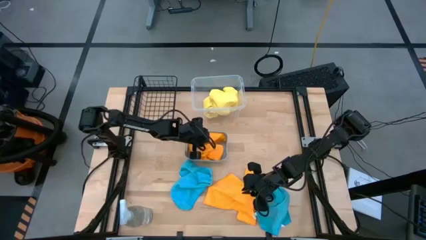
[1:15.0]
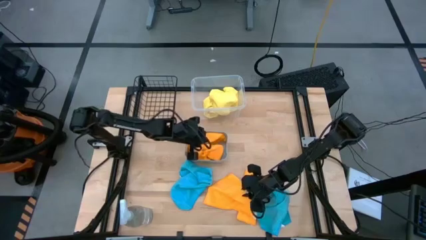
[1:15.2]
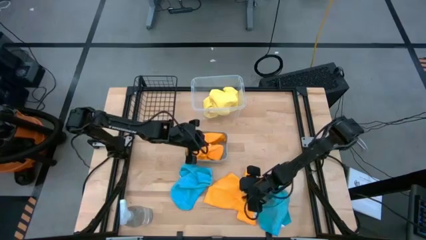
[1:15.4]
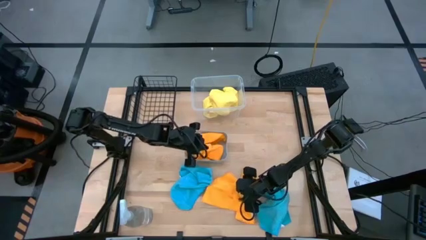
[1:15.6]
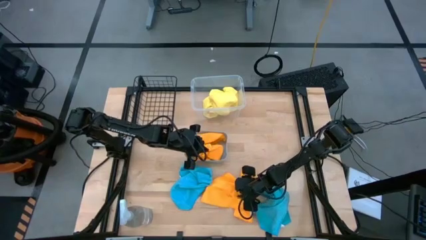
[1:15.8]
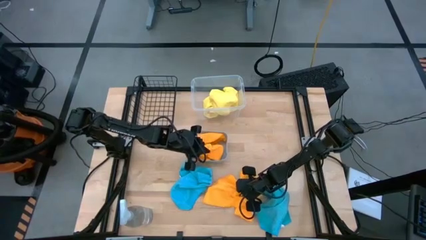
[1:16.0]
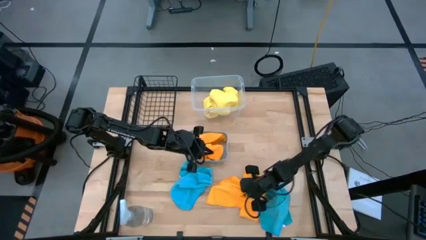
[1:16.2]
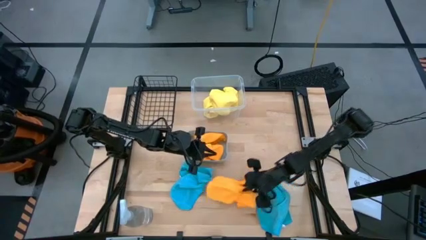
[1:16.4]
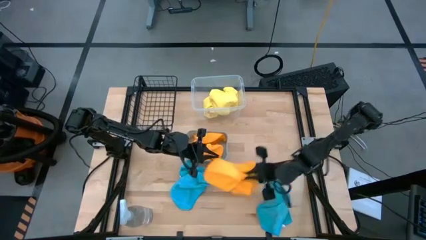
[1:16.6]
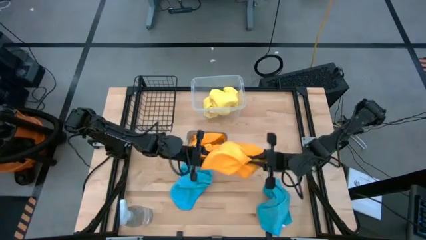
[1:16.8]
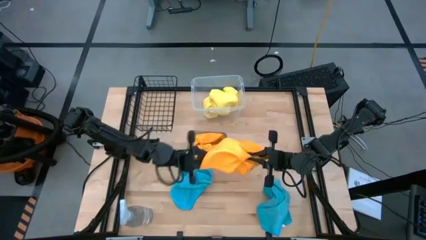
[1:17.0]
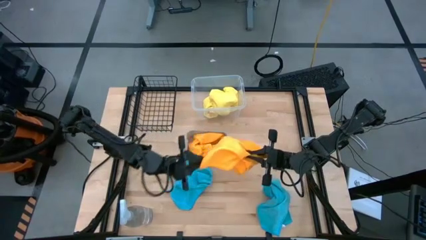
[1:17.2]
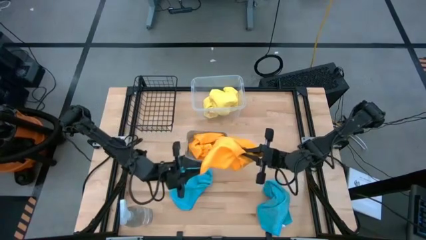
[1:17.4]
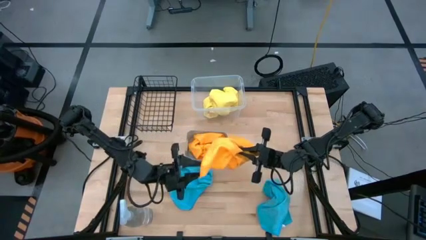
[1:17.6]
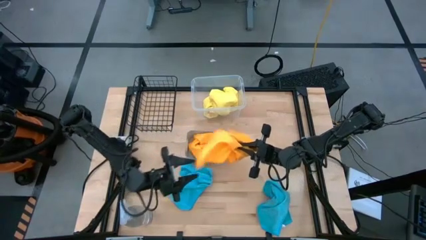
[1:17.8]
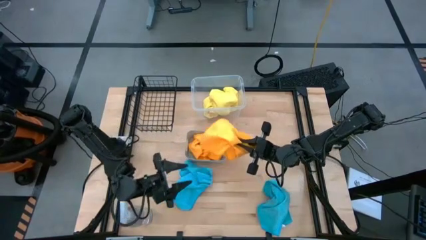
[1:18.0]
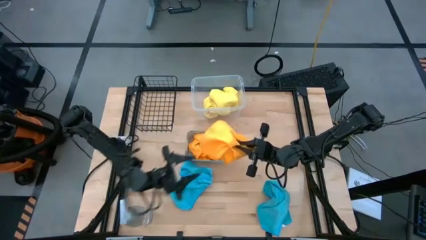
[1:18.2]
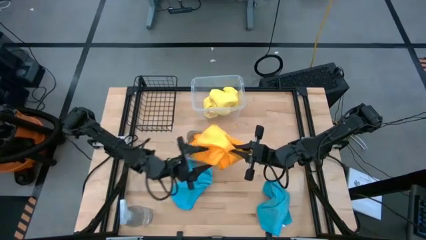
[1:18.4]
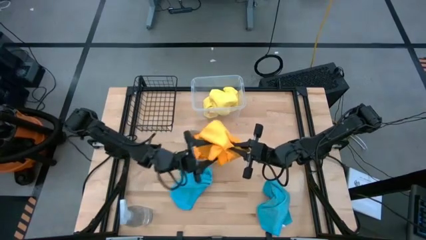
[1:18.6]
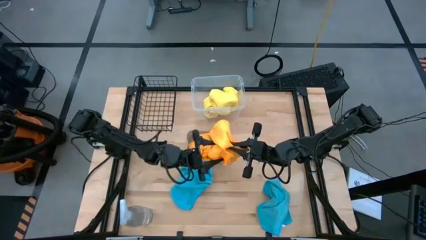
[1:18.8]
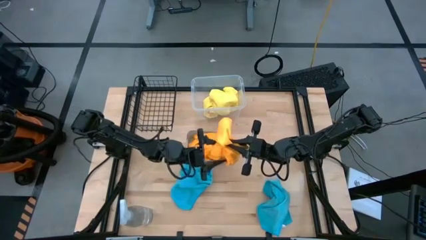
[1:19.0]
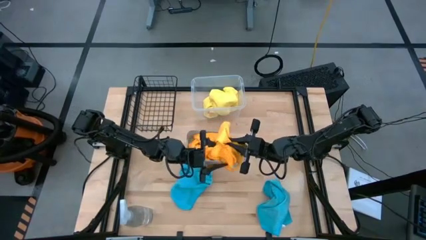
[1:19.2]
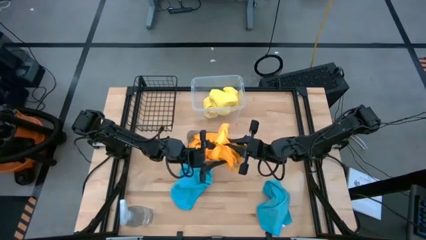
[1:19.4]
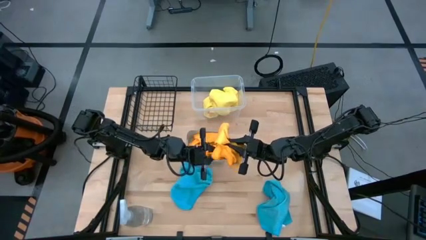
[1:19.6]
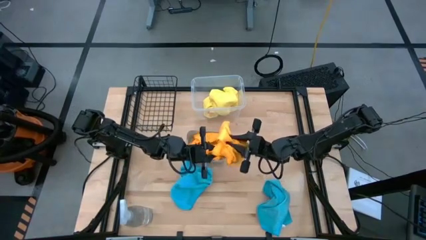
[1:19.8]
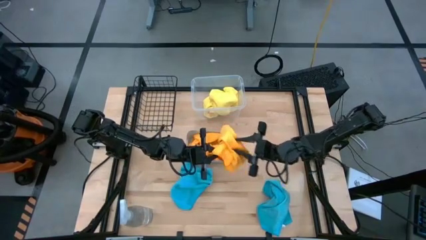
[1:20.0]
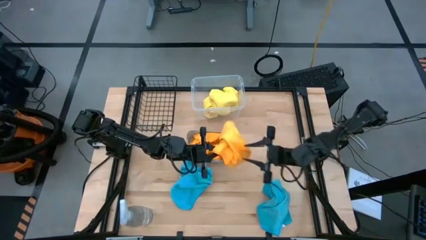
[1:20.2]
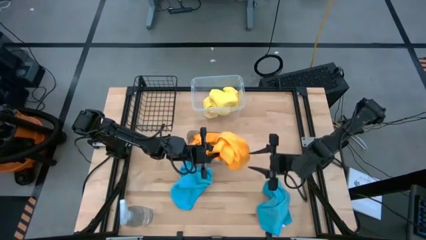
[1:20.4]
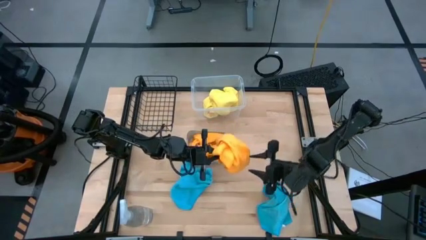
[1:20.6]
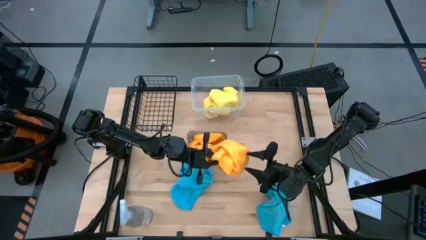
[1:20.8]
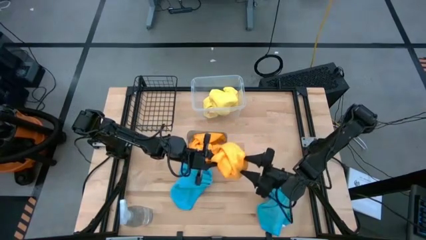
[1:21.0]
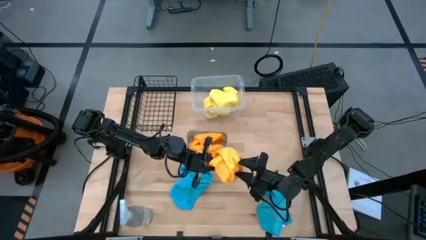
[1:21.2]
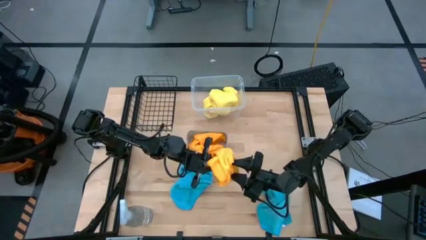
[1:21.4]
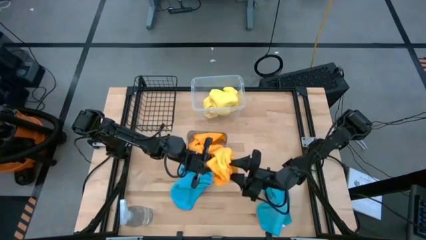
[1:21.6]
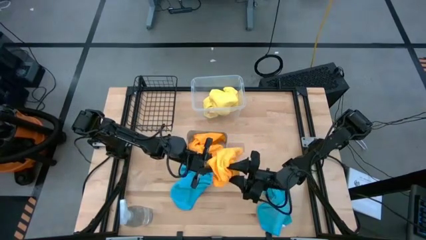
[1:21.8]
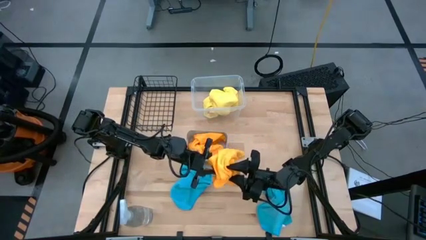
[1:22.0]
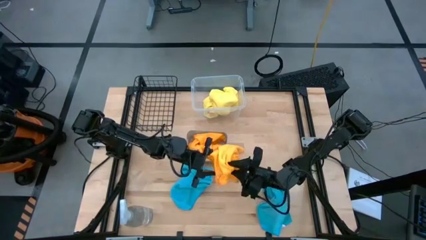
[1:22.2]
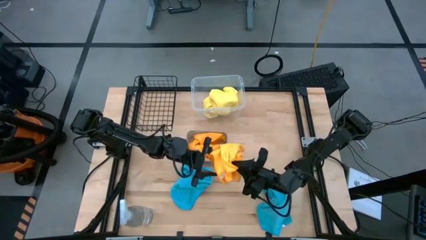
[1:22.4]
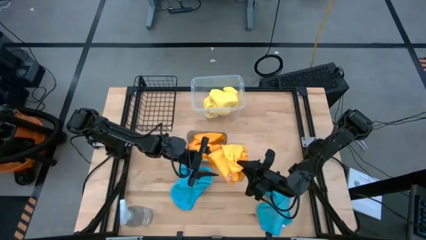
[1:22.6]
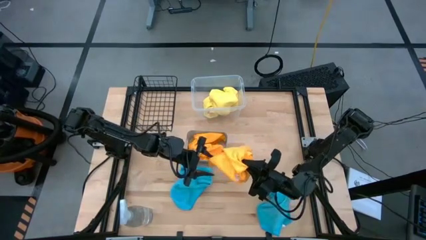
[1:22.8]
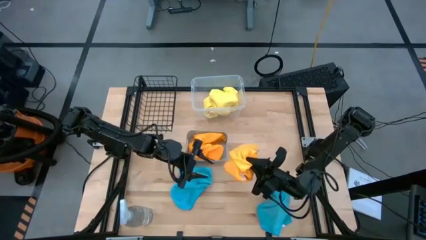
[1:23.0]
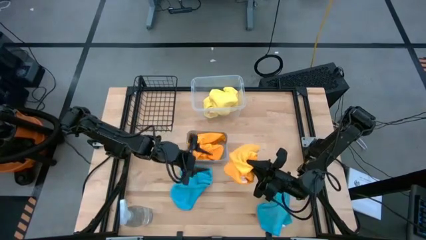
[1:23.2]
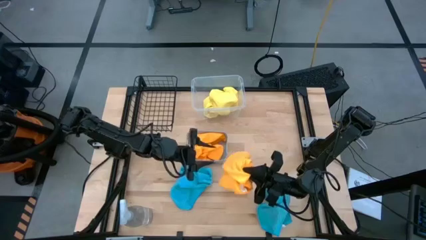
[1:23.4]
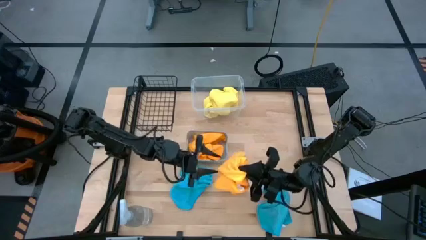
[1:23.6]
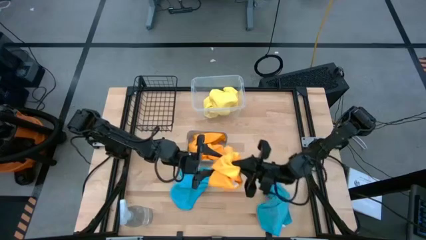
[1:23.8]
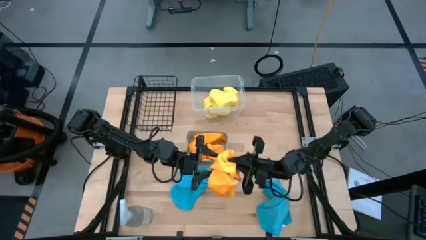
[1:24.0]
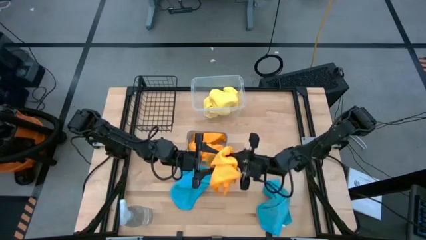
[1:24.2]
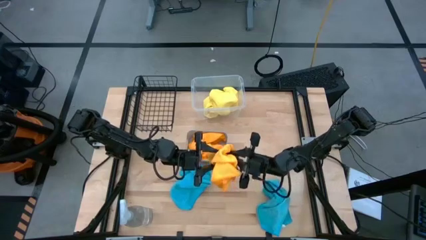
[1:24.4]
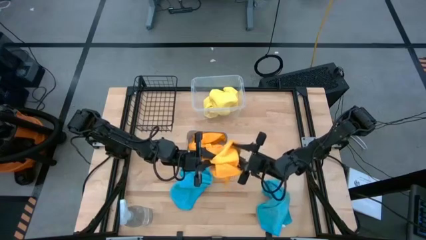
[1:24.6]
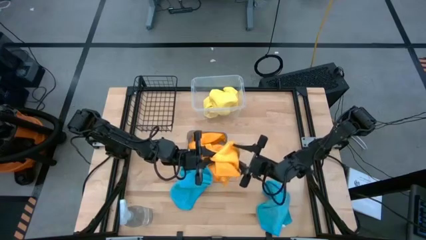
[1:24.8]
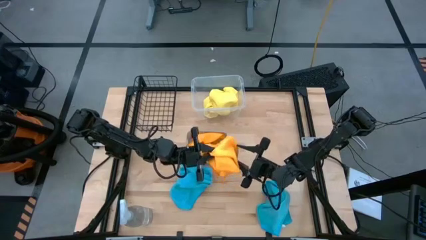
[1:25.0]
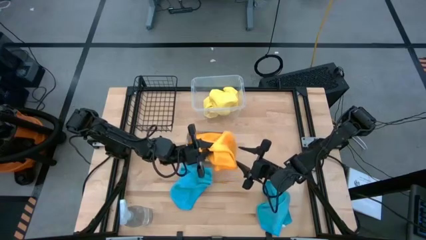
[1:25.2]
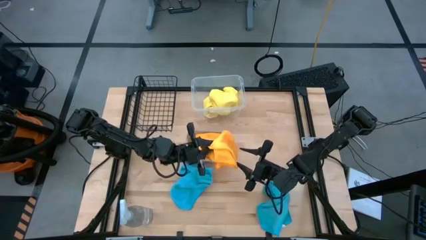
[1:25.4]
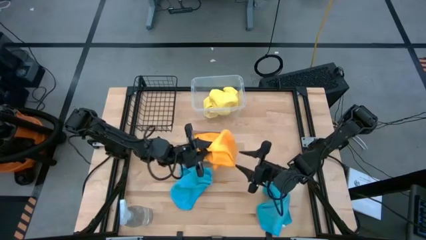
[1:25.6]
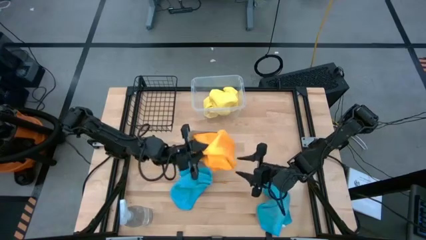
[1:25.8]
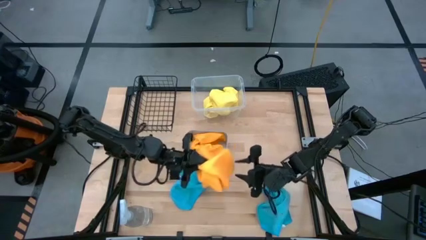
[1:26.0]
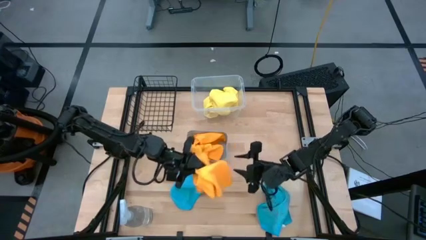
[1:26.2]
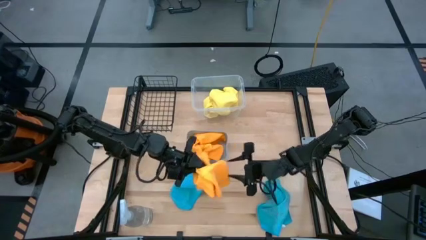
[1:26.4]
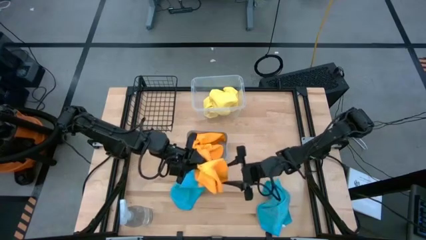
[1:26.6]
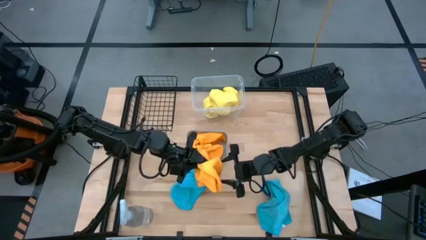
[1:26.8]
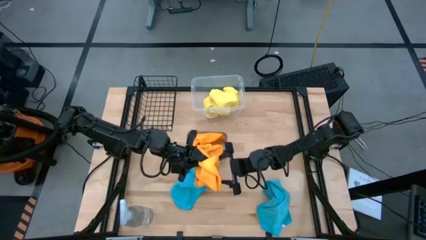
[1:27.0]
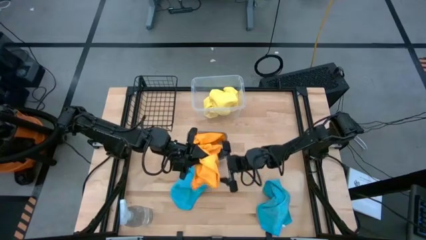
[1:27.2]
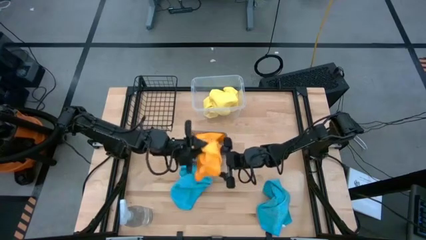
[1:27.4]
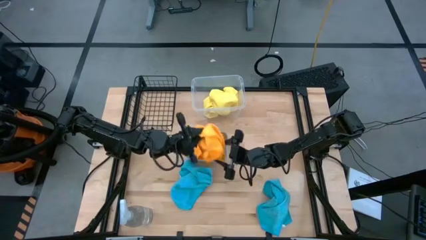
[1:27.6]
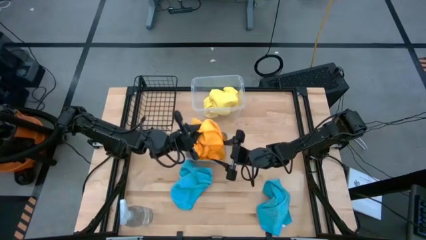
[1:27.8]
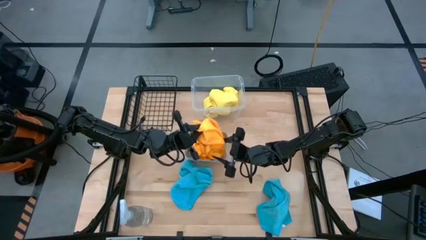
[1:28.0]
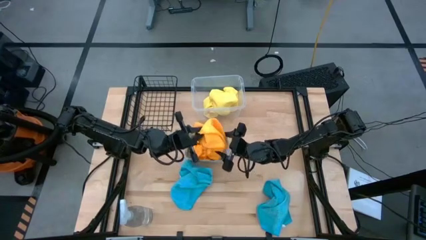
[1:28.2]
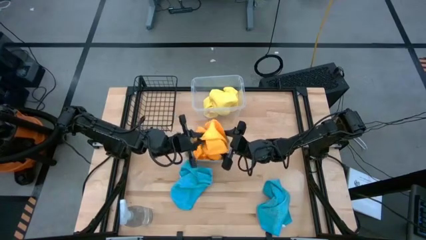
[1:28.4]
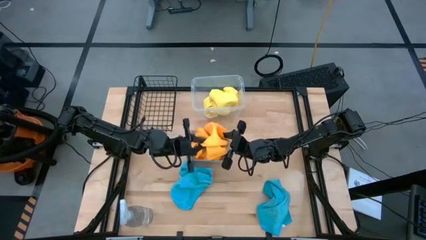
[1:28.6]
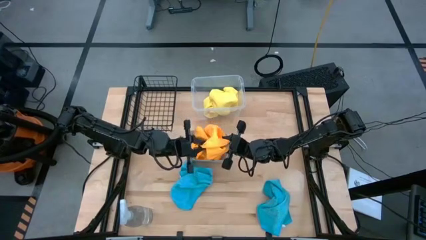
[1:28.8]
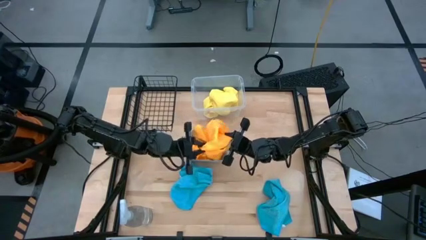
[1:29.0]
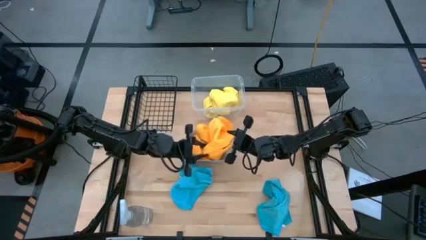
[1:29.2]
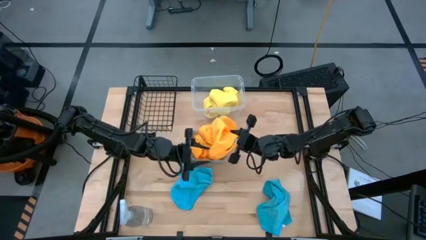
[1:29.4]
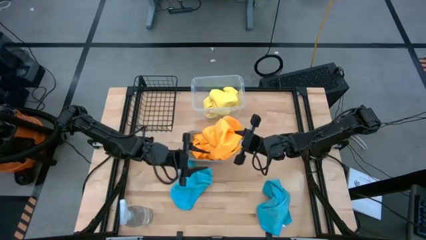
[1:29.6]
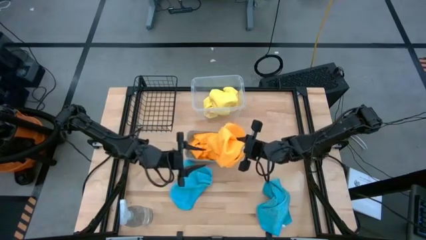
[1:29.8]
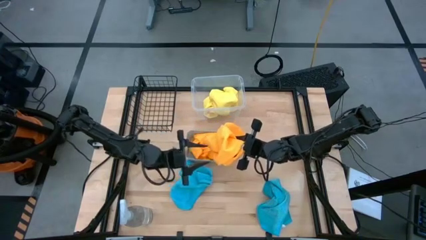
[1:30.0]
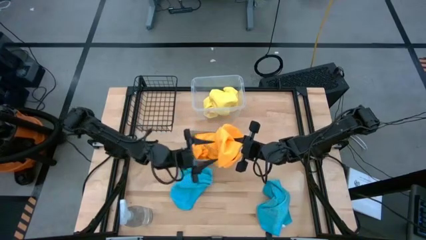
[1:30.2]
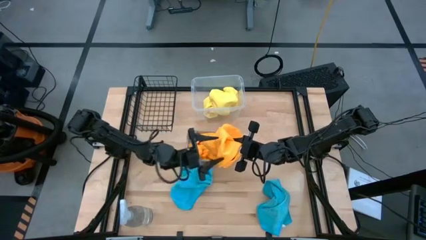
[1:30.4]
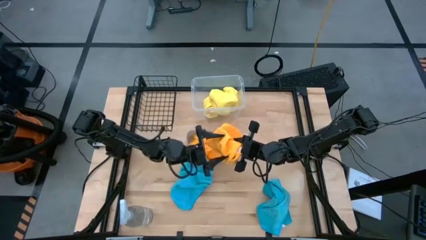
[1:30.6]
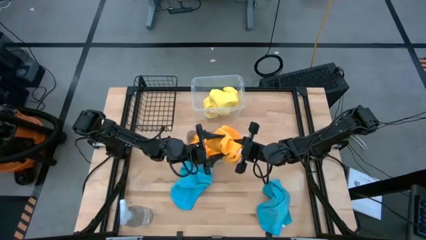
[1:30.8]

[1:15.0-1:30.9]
Task: Sort microfiber towel by color & place in baskets
Put the orange microfiber cloth into the gray bin
